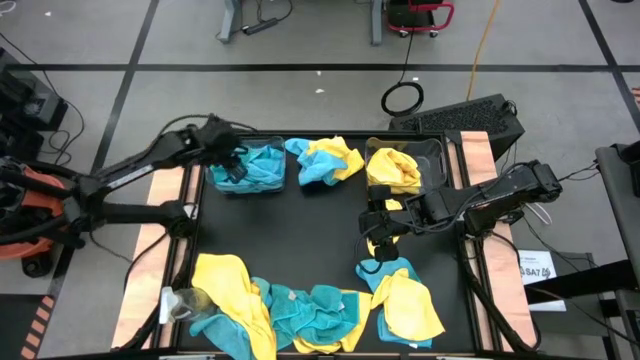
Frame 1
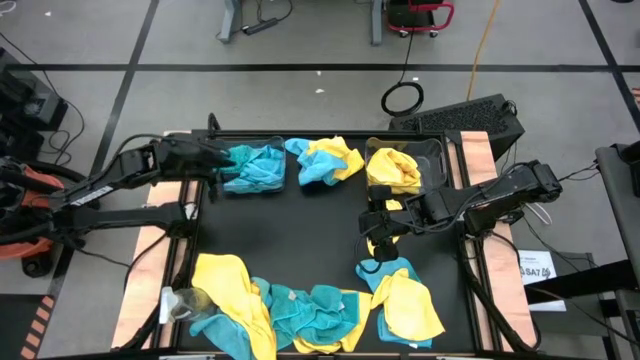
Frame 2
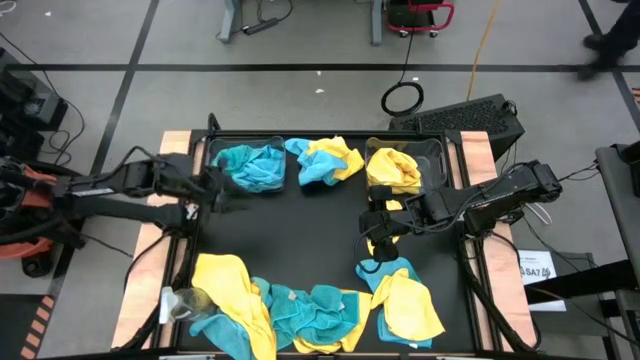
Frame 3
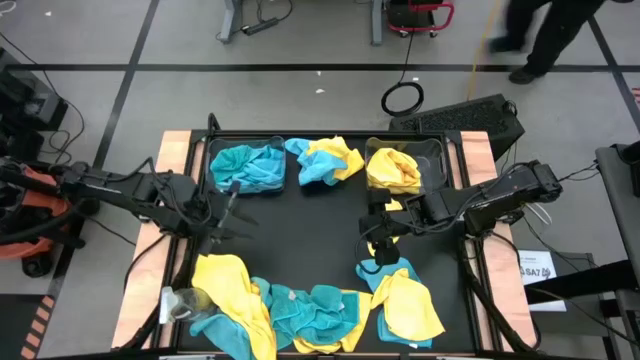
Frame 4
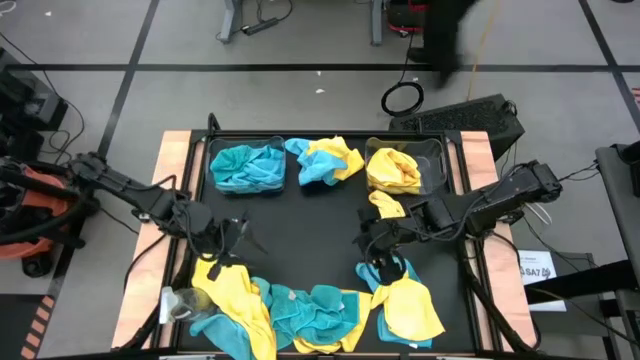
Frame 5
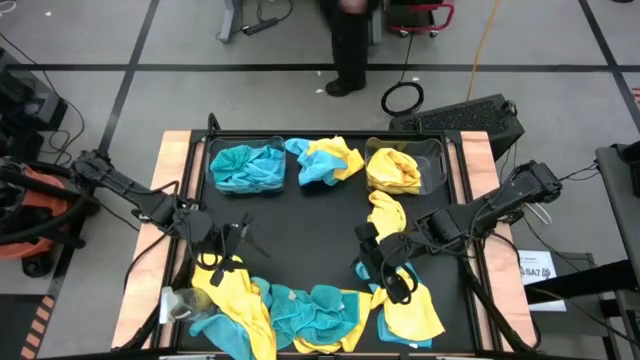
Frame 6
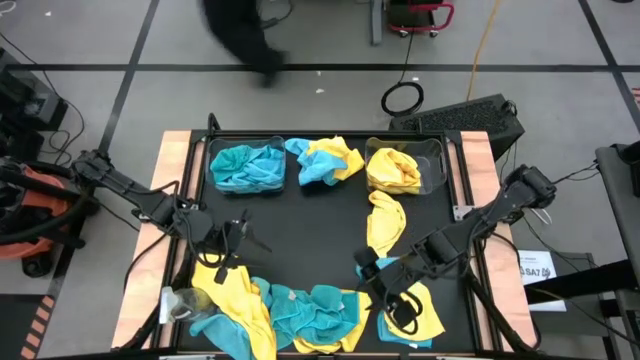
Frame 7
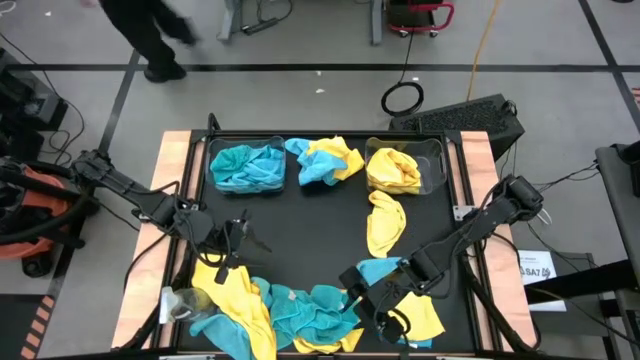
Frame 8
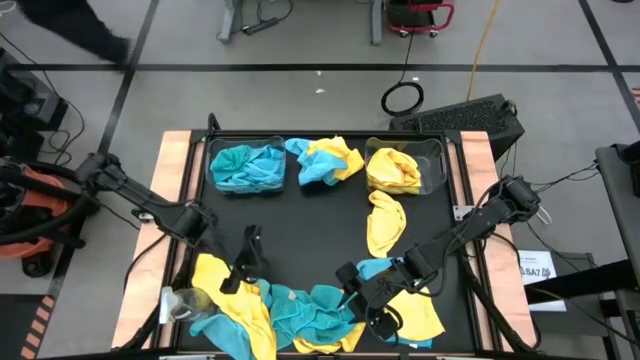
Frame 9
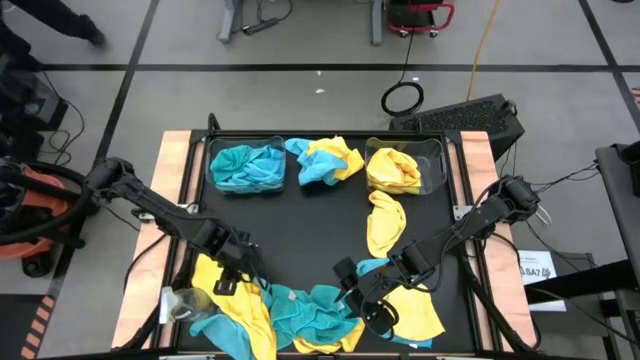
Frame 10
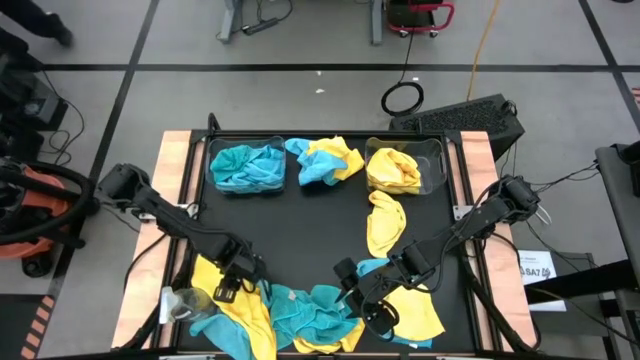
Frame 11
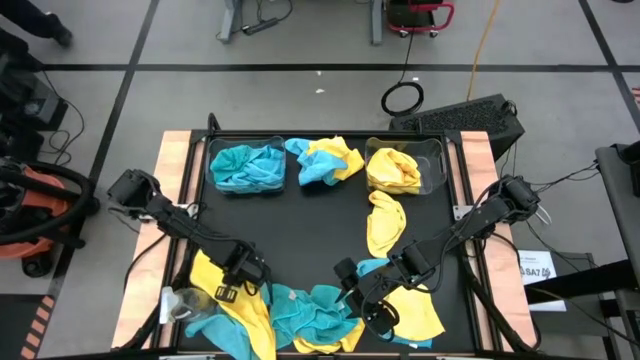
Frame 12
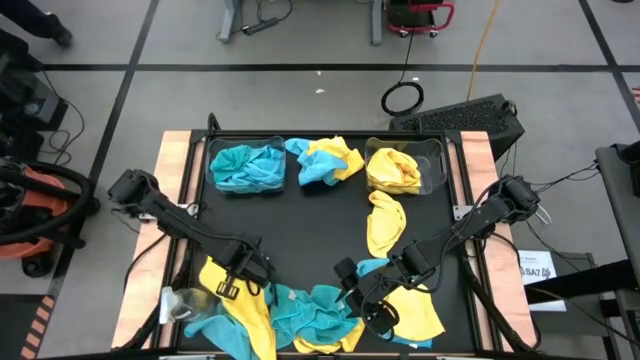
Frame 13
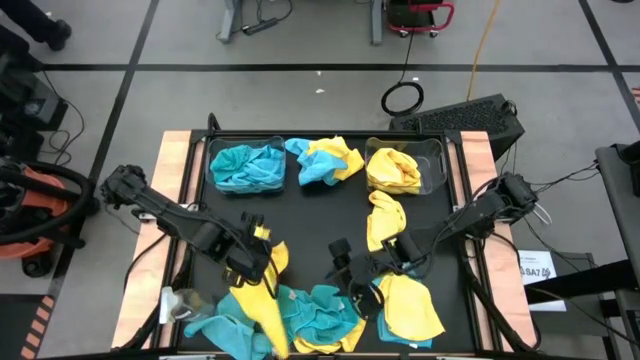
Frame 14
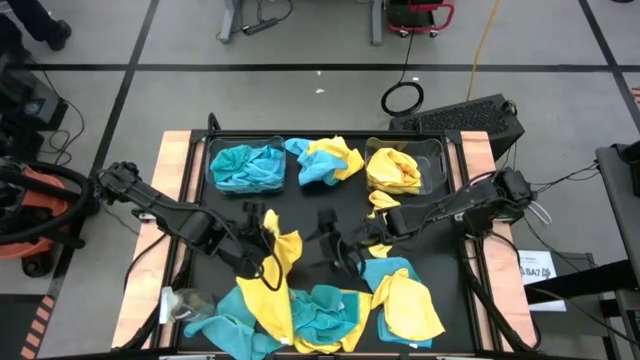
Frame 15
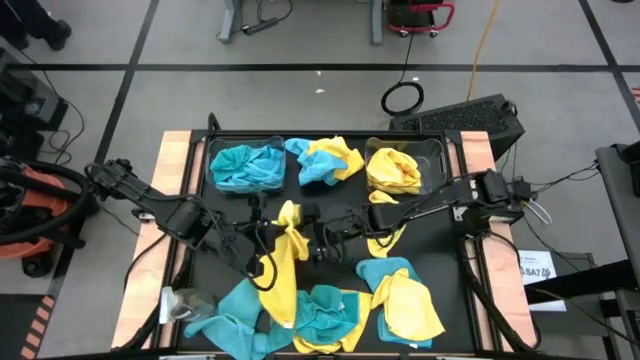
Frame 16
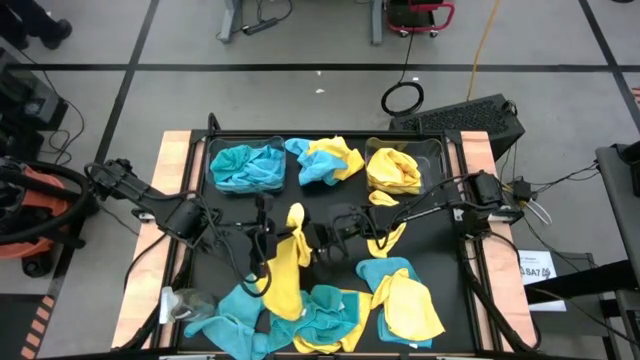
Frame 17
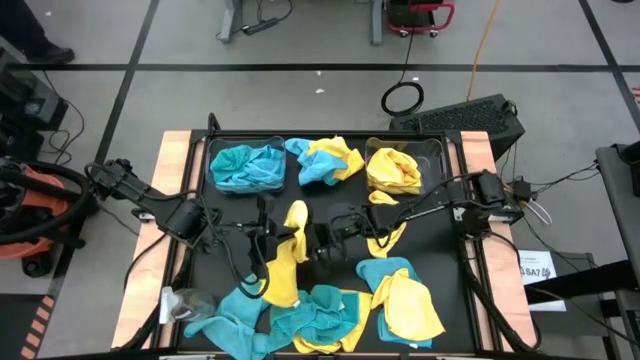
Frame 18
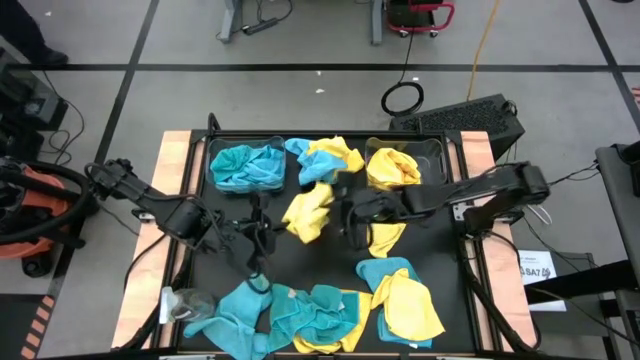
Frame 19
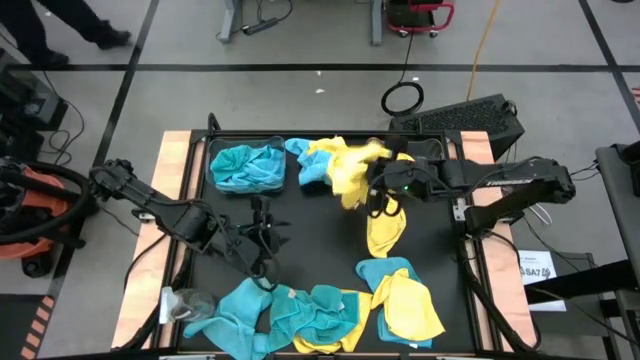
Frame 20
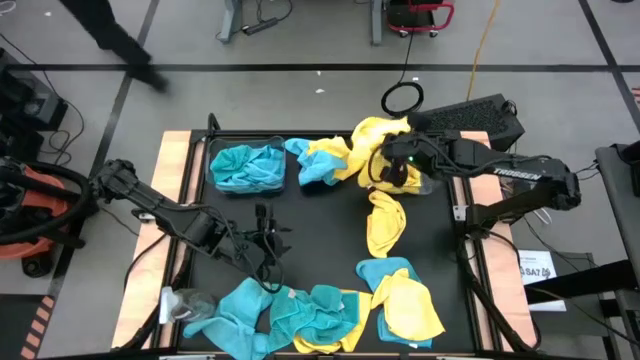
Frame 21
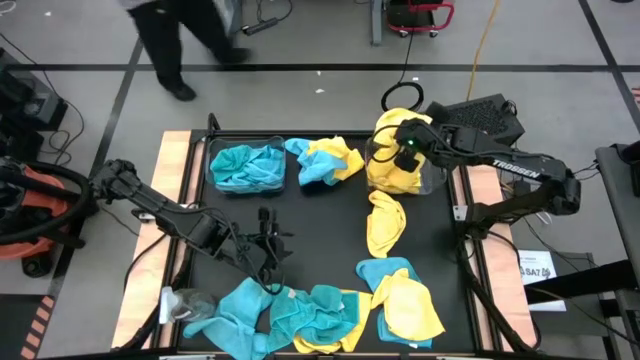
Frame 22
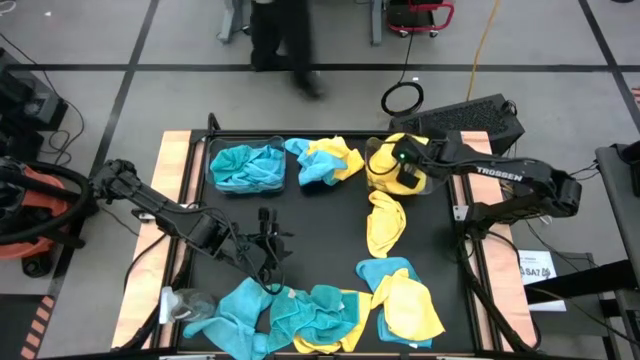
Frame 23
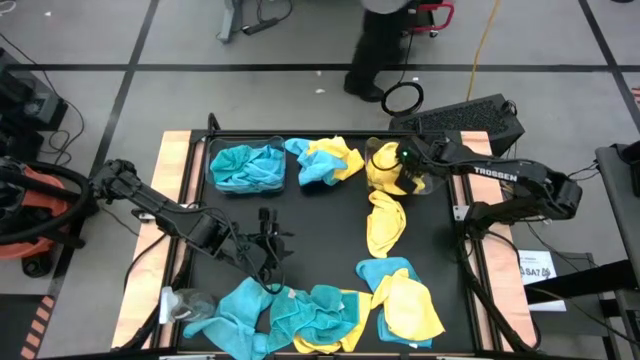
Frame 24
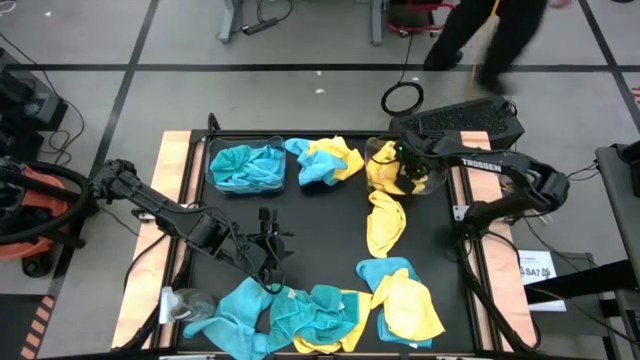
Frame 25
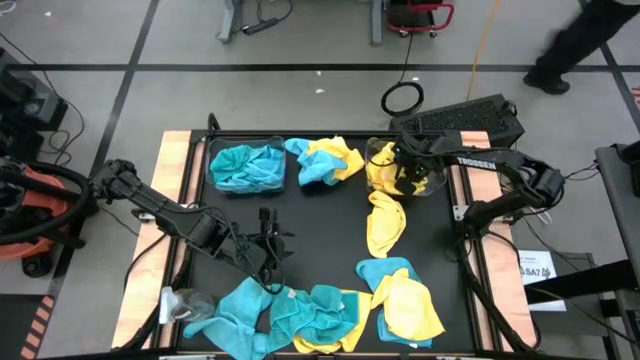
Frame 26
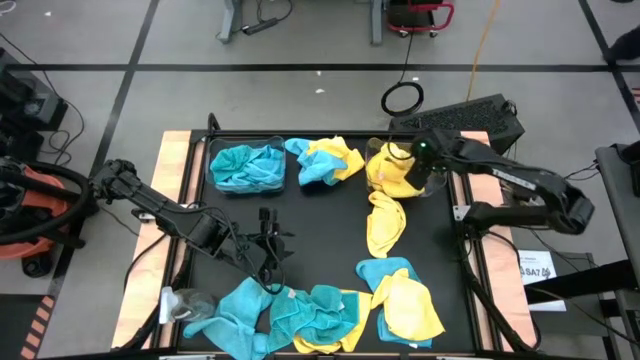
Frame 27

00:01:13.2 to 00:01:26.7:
Task: Sort microfiber towel by color & place in baskets
Put the yellow microfiber cloth into the right transparent bin

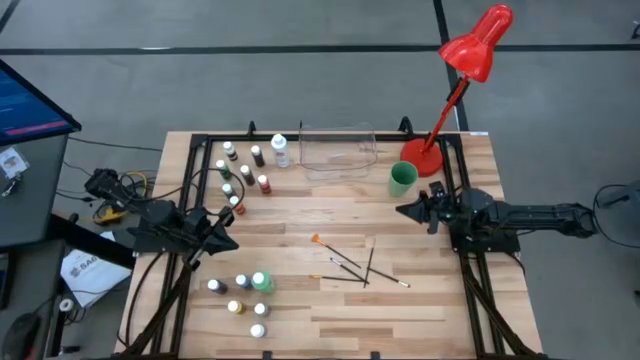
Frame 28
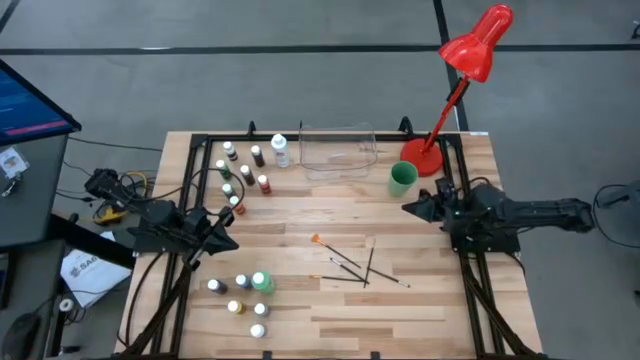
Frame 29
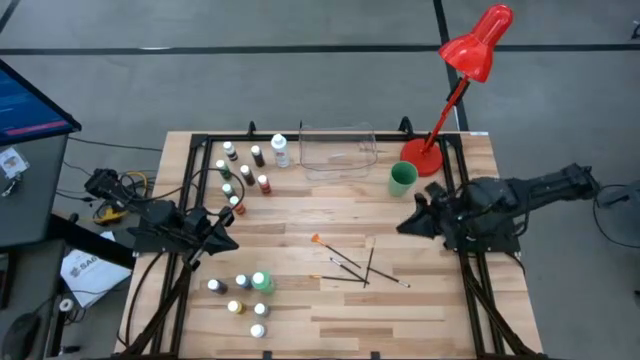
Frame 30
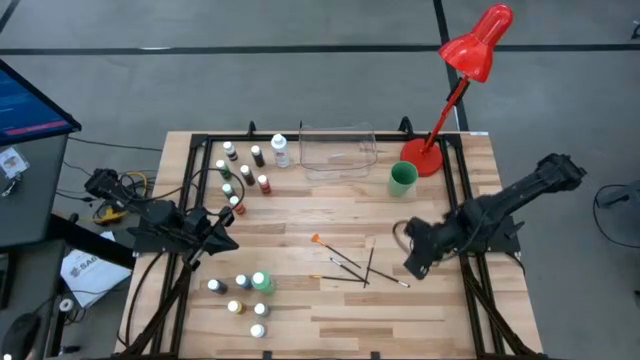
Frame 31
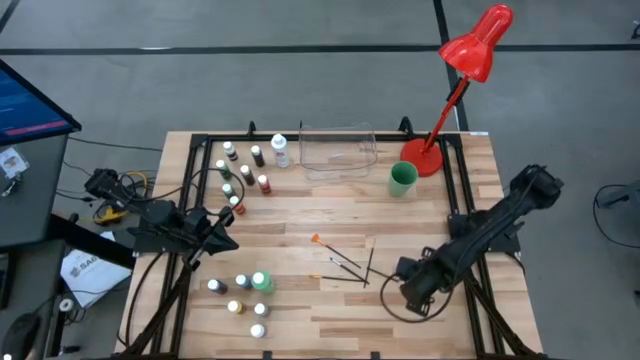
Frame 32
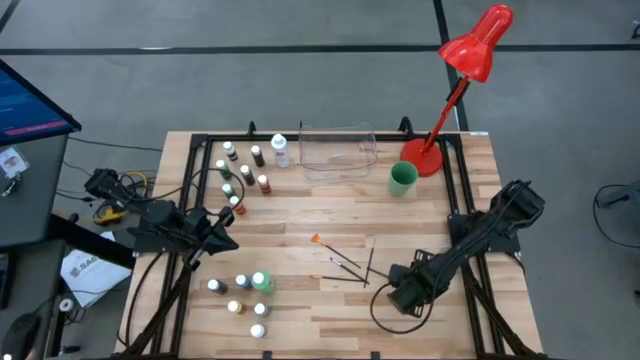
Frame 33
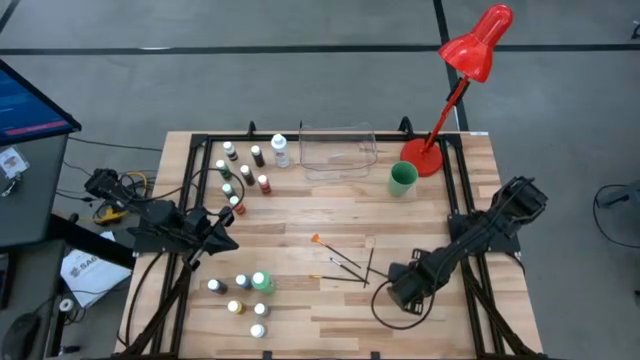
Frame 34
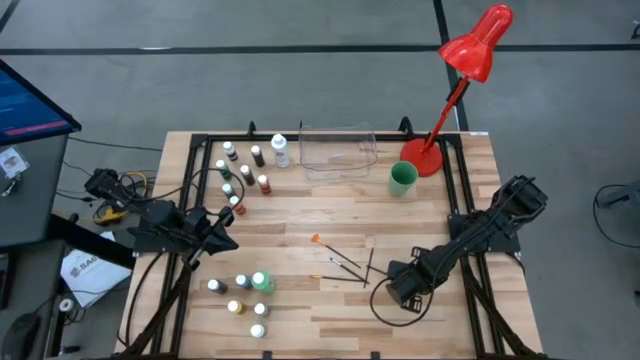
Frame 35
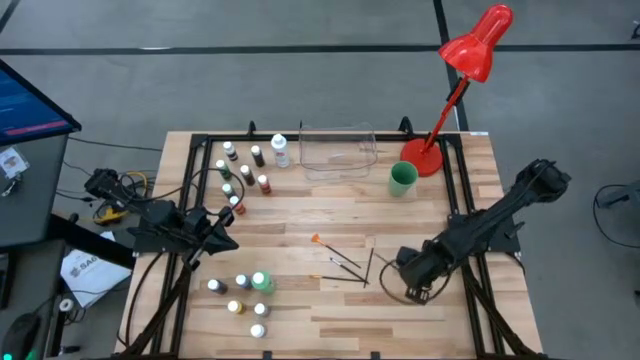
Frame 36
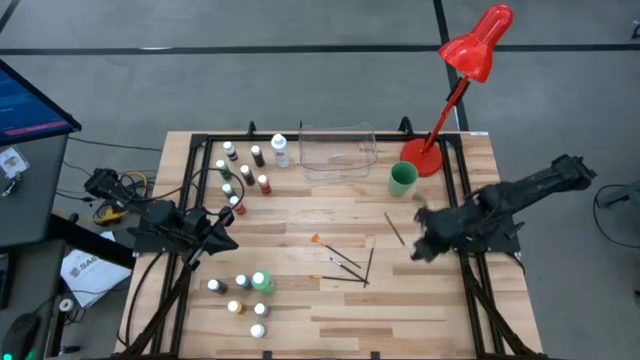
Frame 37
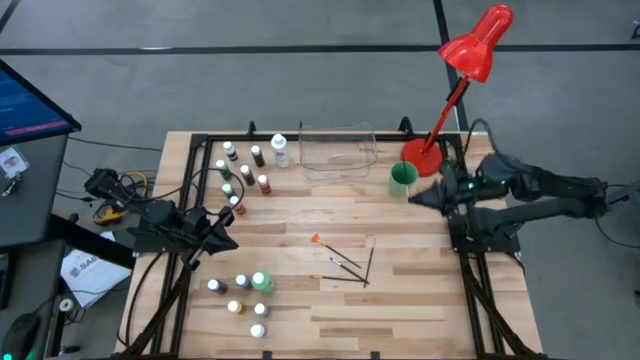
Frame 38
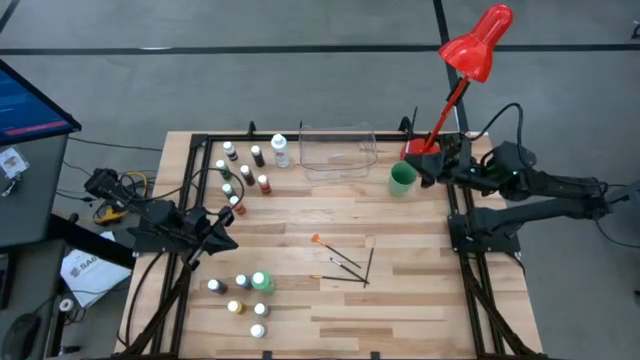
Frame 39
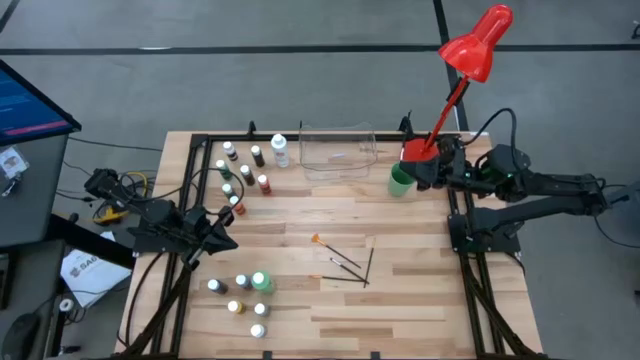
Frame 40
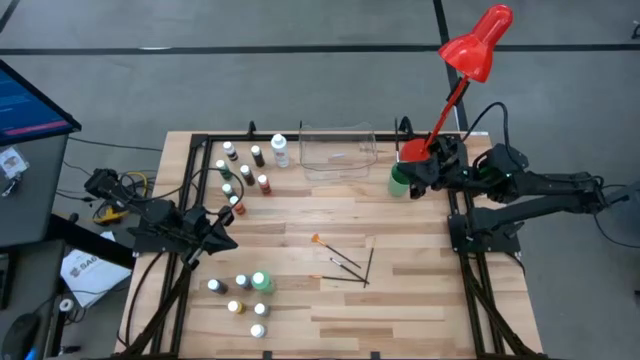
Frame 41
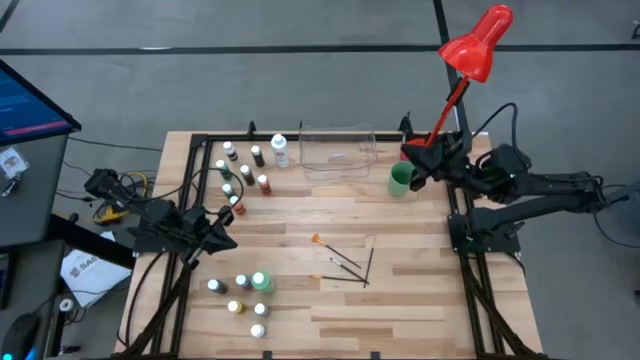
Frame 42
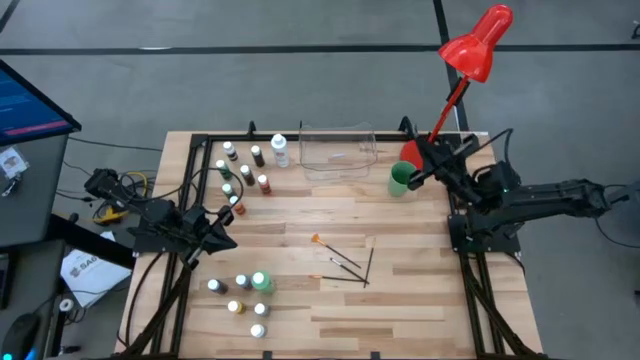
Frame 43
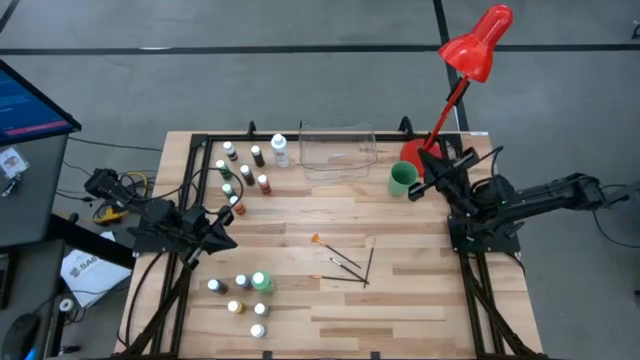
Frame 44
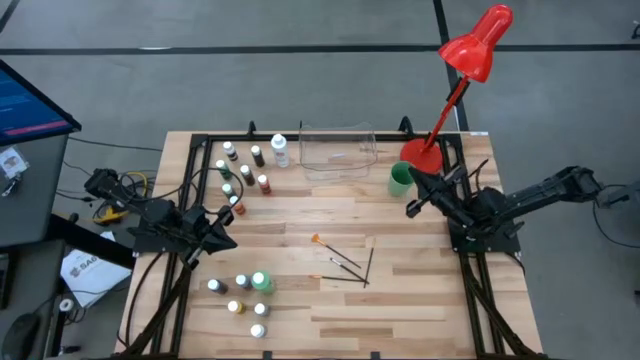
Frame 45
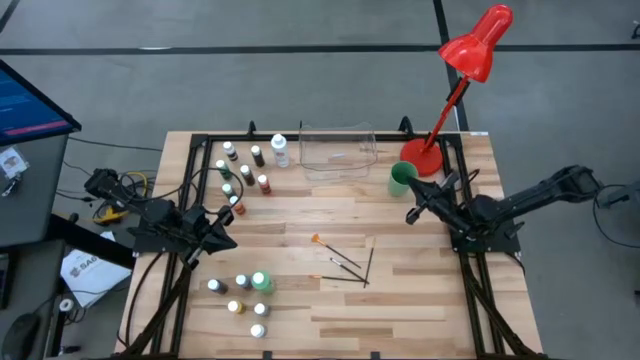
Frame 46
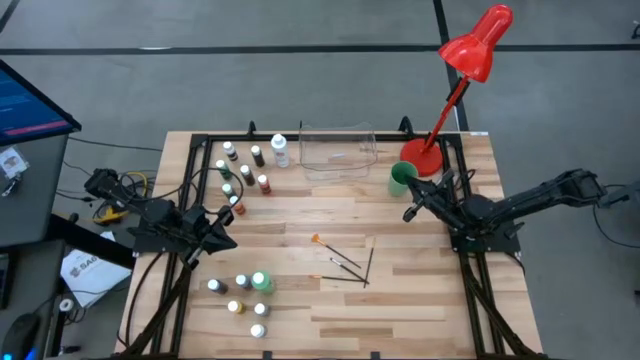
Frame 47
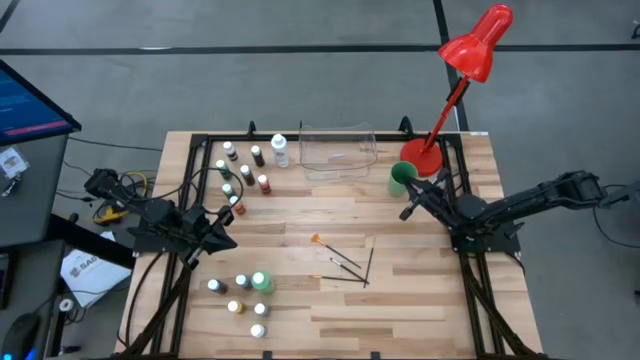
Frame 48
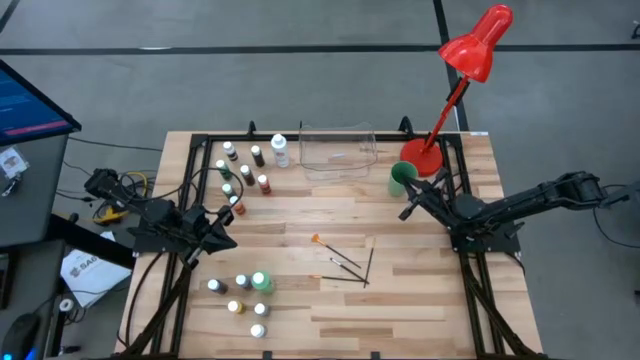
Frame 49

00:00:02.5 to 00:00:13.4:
Task: Pick & Place Paint Supplies
Put the right silver paint brush into the green cup
